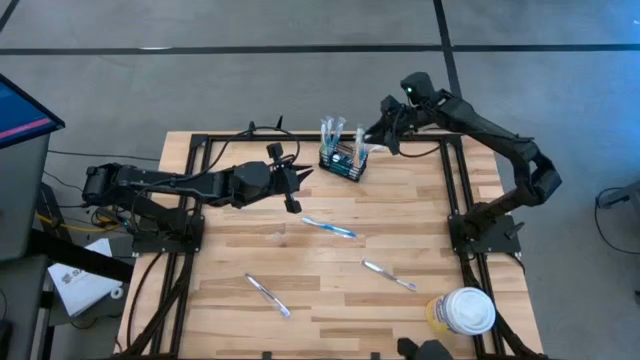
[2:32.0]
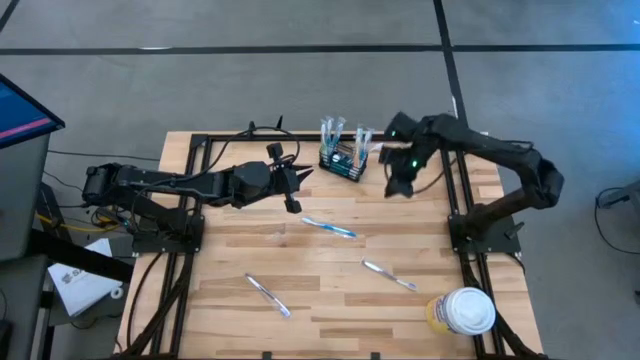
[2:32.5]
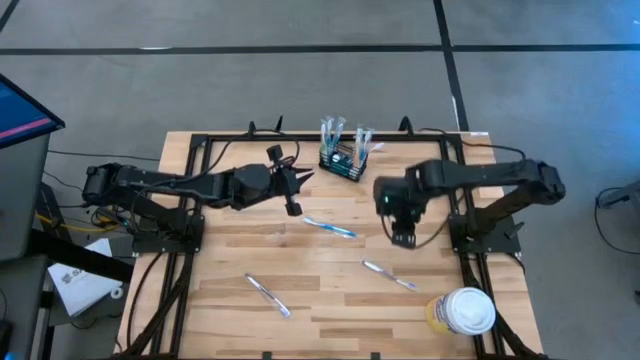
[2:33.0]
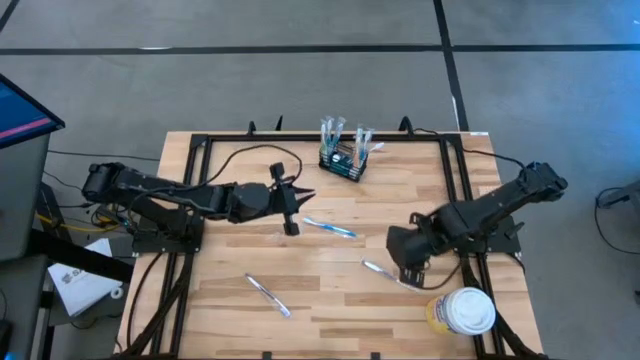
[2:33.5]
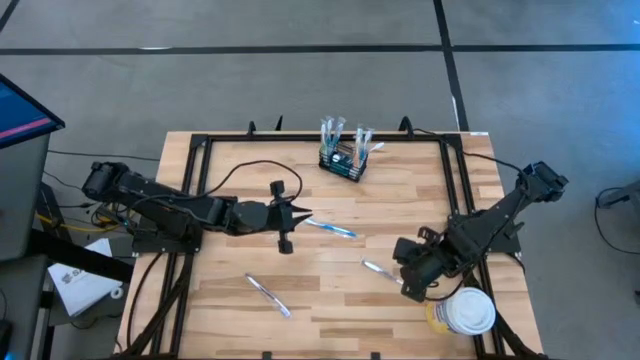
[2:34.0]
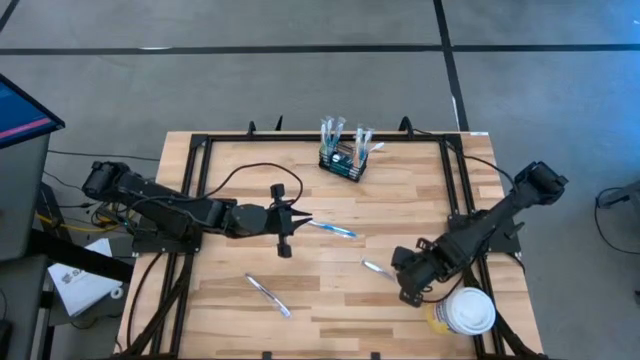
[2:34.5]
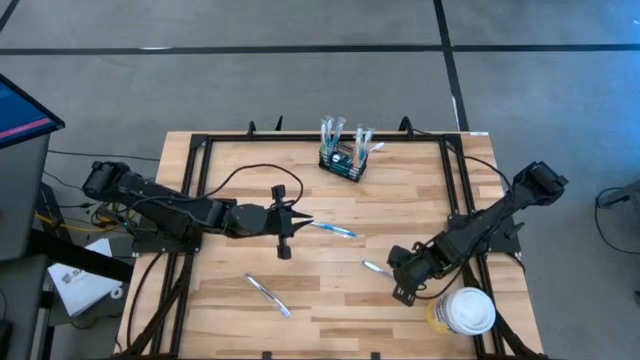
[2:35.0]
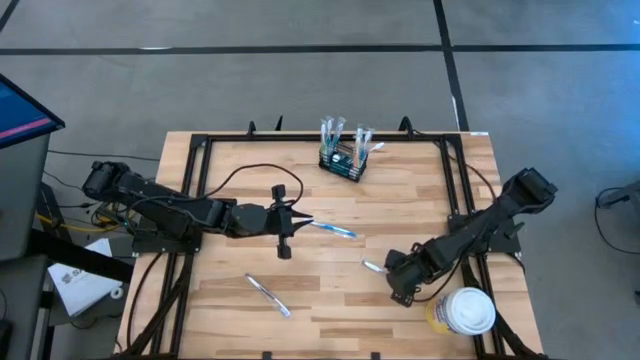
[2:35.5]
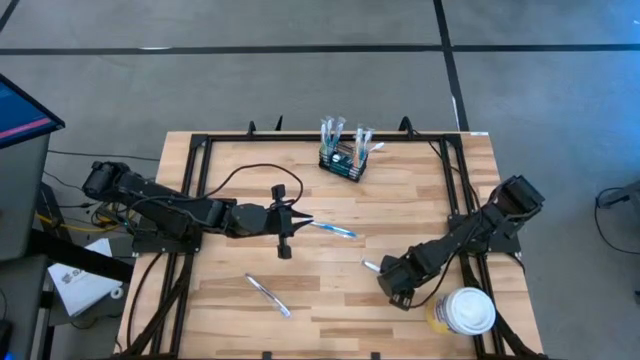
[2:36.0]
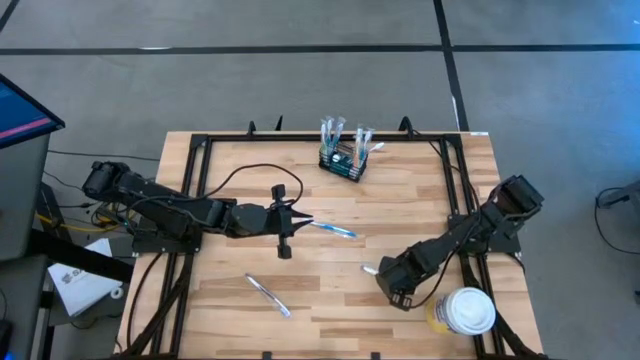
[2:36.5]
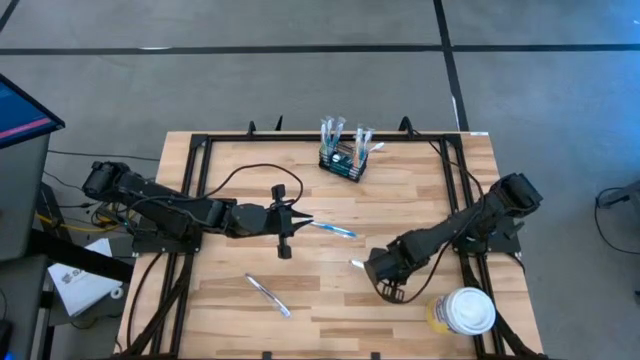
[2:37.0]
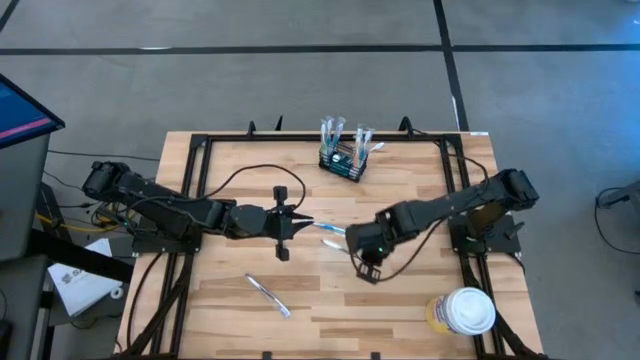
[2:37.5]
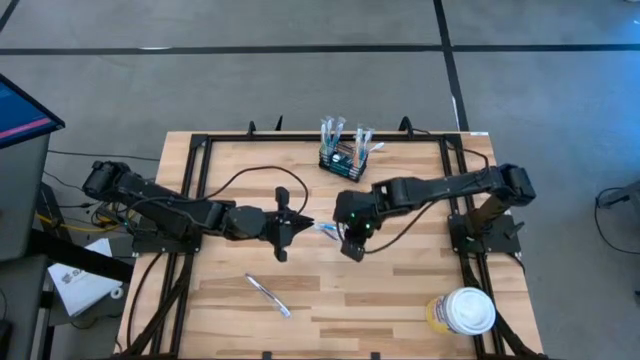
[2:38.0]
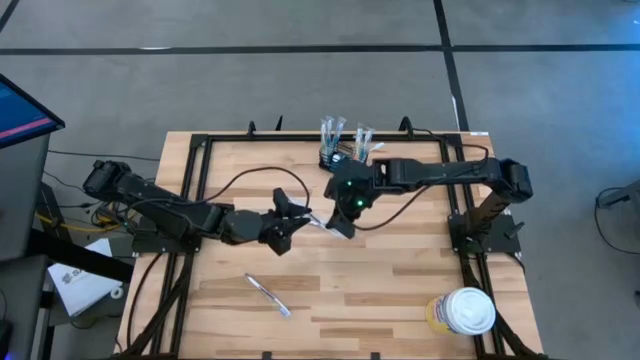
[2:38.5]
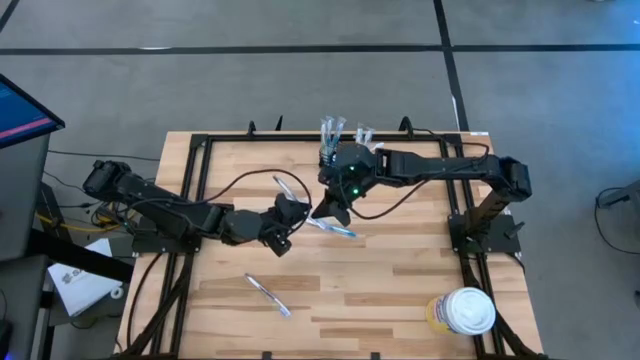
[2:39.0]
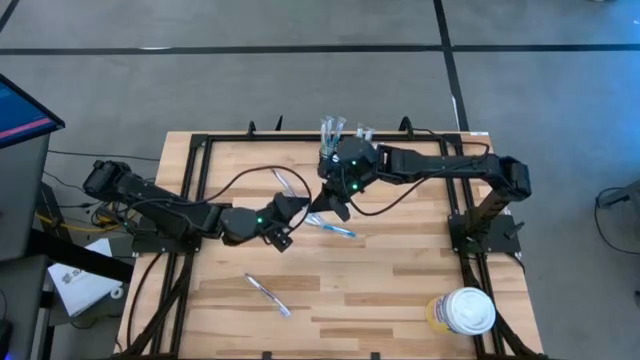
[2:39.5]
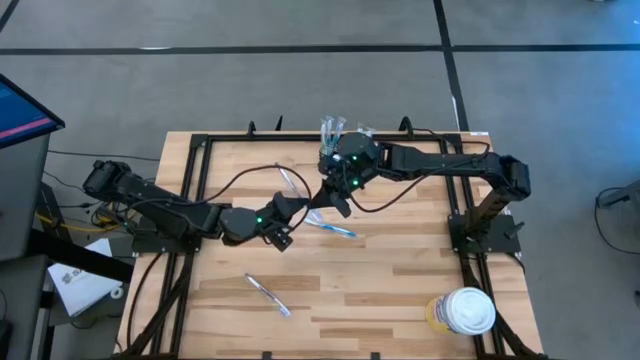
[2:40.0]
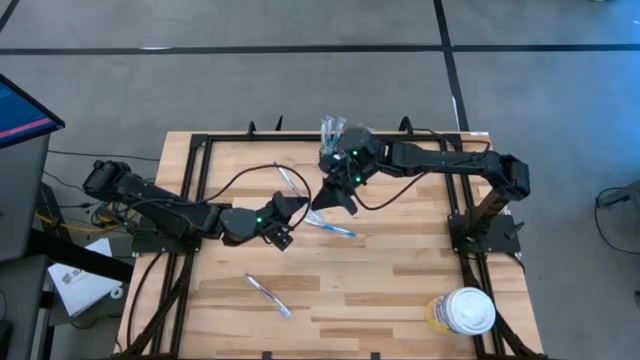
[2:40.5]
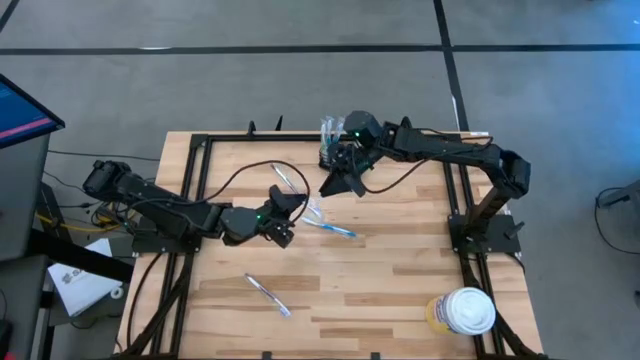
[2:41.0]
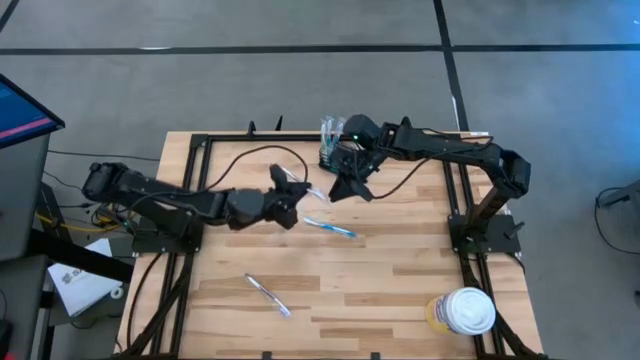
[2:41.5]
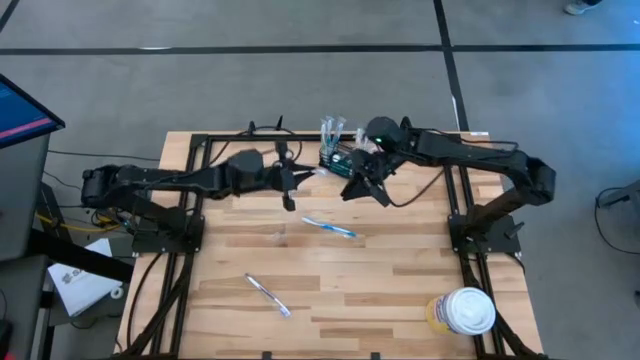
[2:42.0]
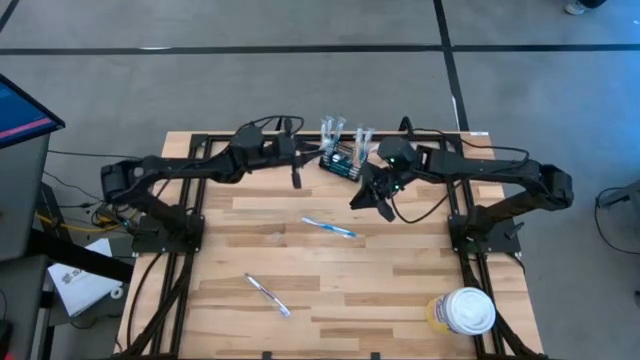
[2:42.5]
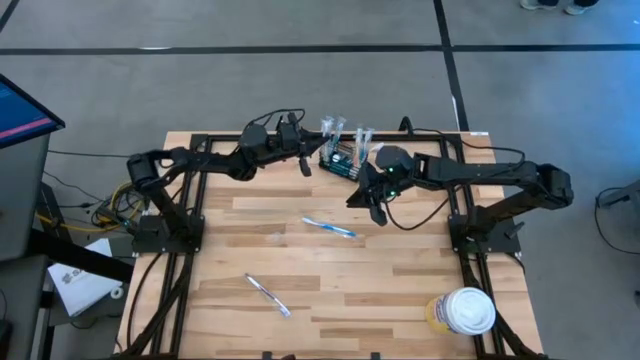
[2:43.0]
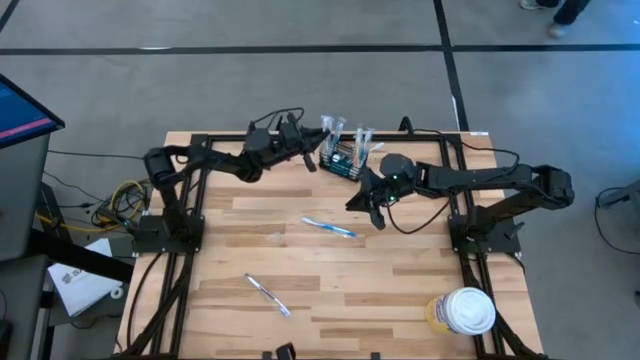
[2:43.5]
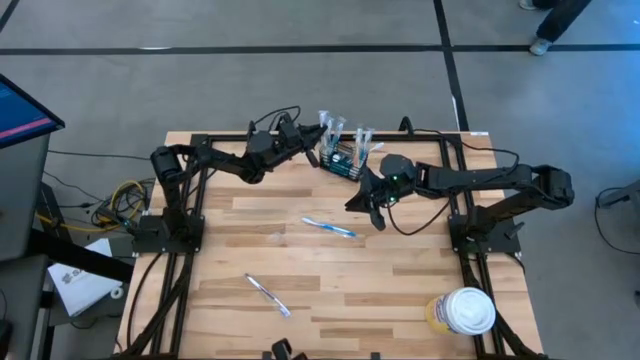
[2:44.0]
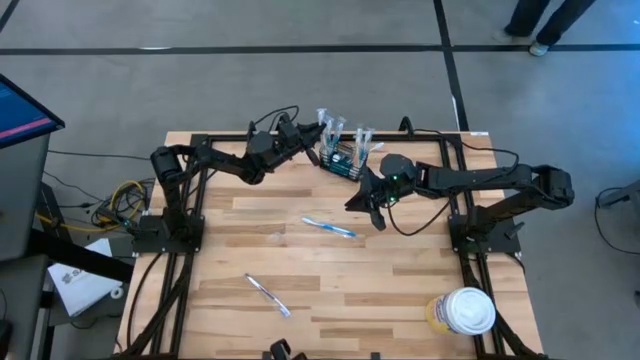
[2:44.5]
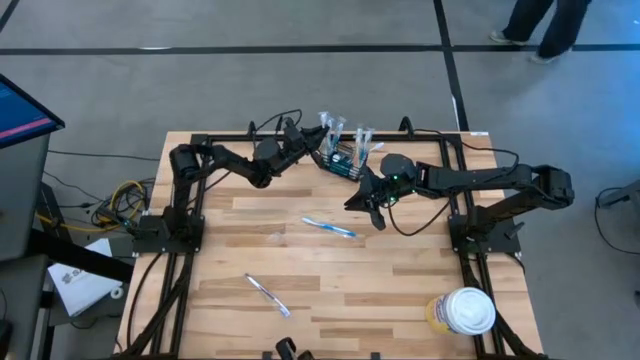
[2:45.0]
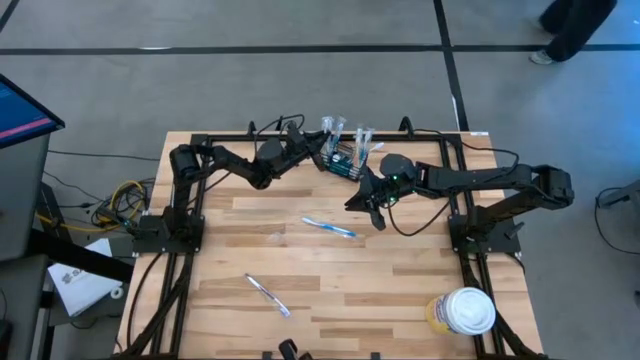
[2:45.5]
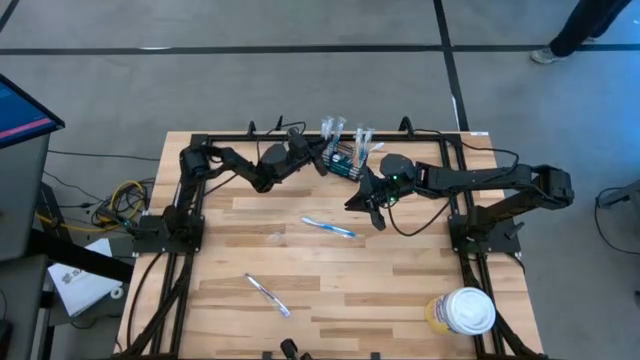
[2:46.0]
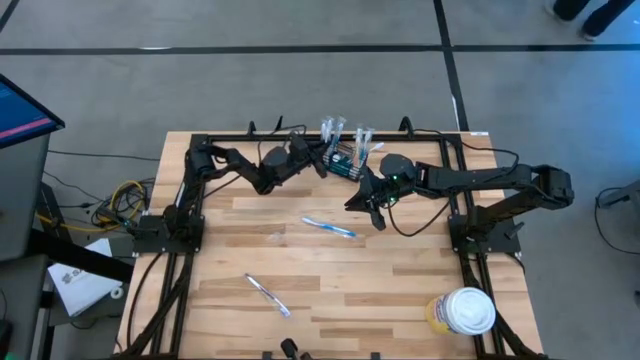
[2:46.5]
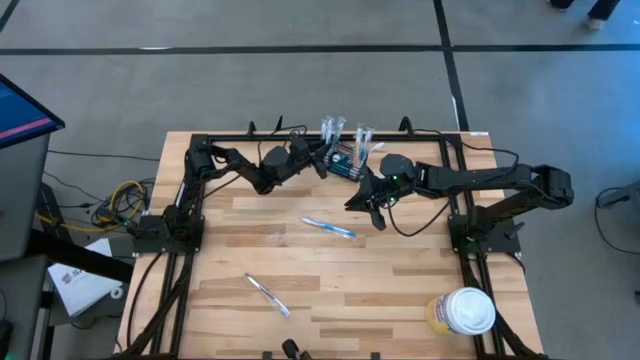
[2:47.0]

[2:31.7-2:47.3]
Task: Pick & Place toothbrushing station
Put the right violet toothbrush into the mesh organizer
